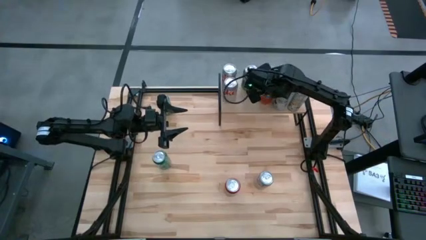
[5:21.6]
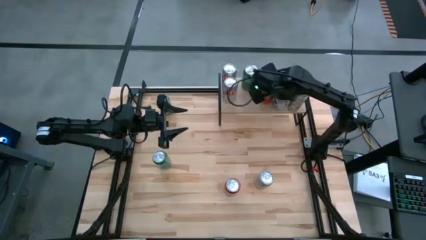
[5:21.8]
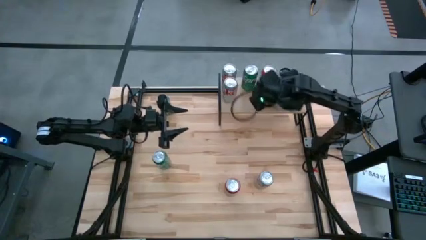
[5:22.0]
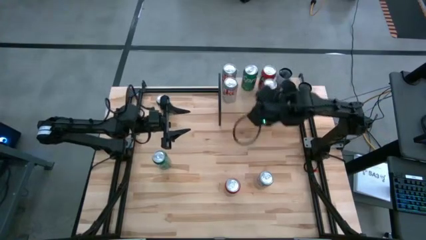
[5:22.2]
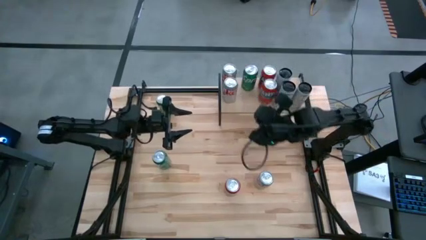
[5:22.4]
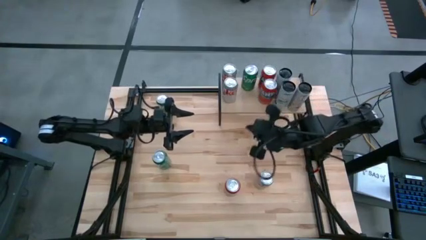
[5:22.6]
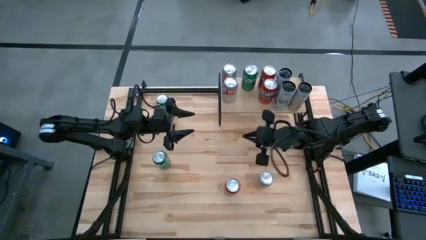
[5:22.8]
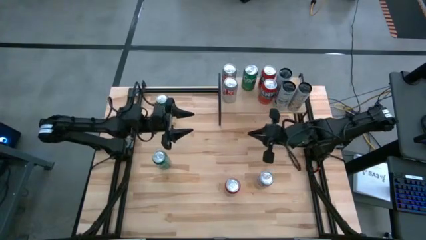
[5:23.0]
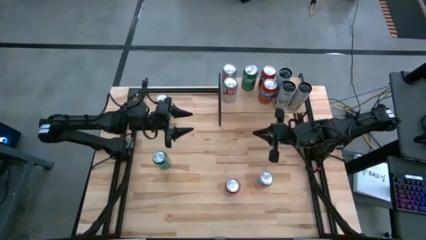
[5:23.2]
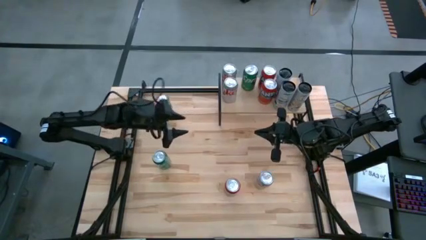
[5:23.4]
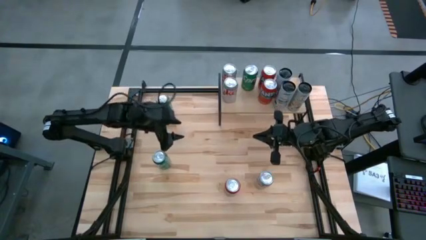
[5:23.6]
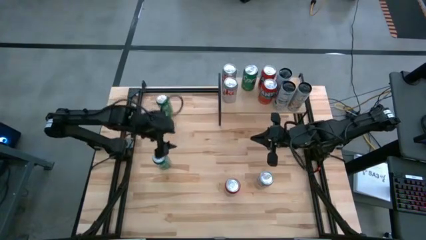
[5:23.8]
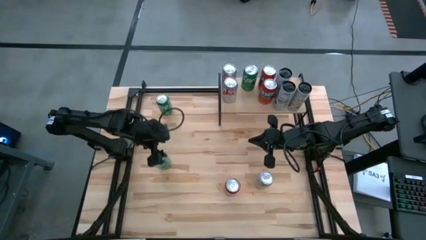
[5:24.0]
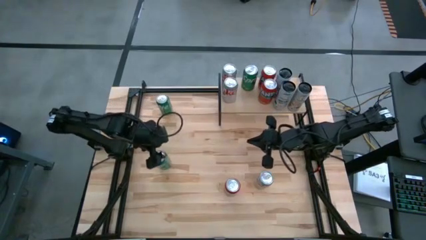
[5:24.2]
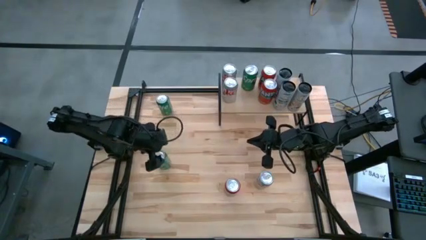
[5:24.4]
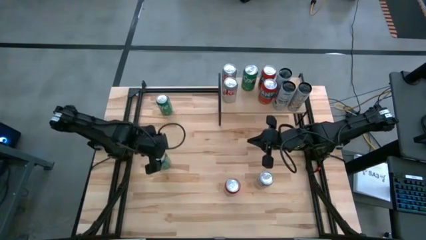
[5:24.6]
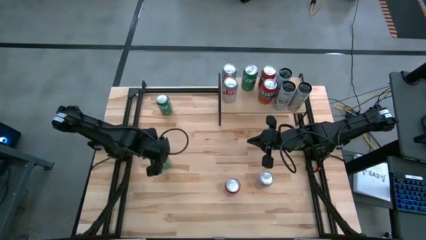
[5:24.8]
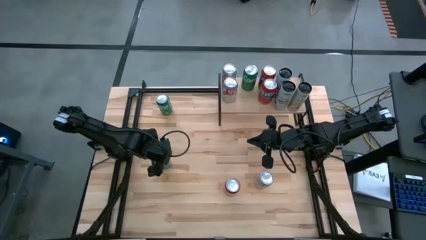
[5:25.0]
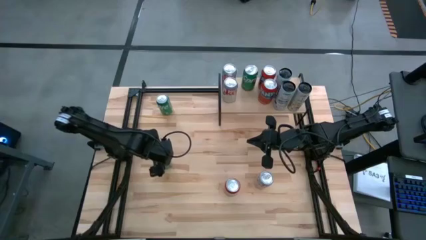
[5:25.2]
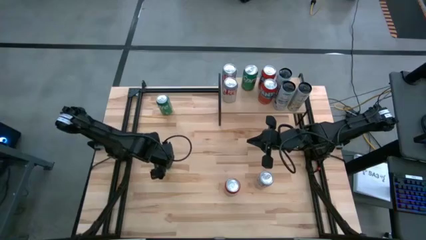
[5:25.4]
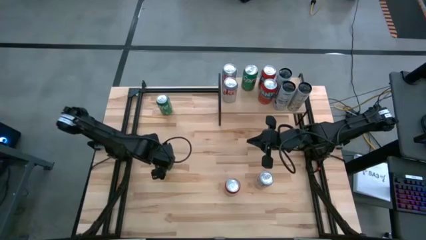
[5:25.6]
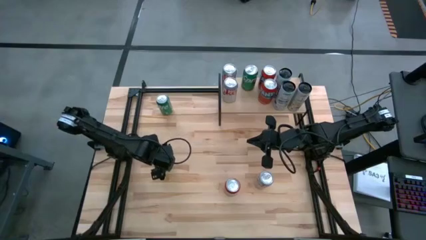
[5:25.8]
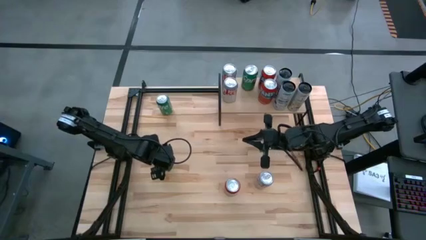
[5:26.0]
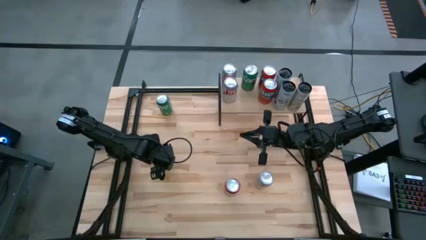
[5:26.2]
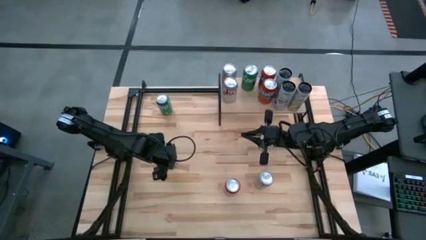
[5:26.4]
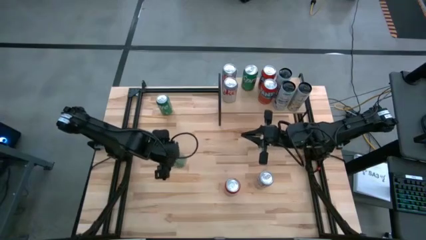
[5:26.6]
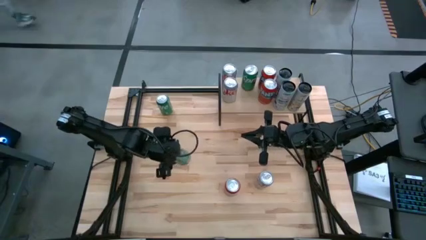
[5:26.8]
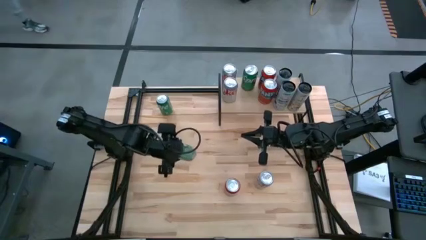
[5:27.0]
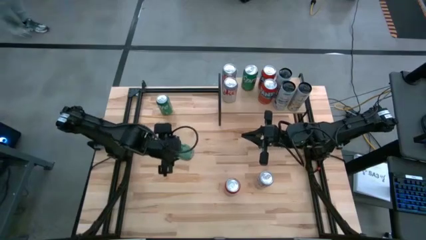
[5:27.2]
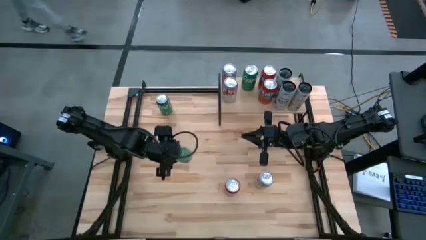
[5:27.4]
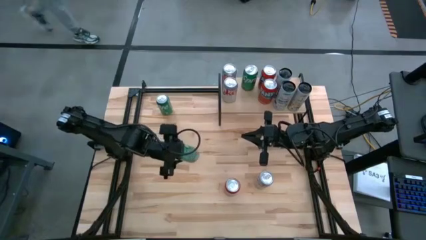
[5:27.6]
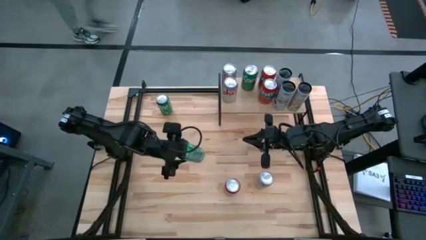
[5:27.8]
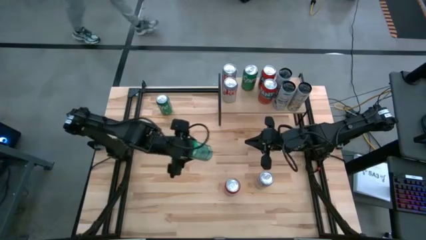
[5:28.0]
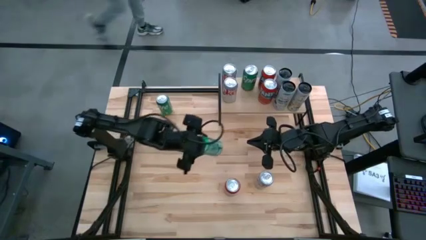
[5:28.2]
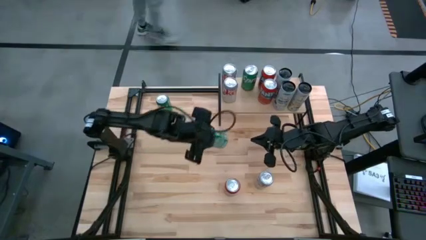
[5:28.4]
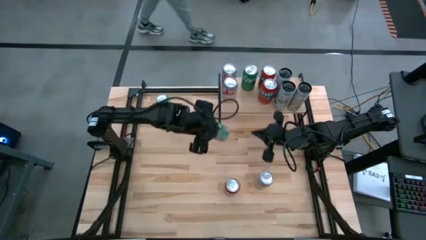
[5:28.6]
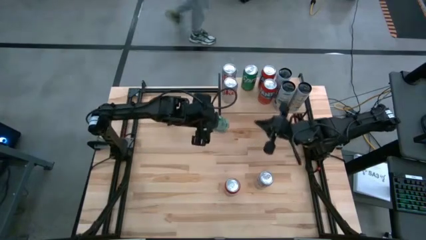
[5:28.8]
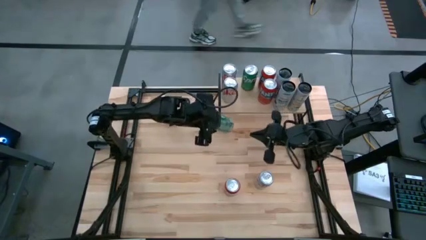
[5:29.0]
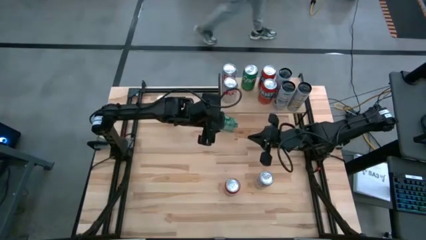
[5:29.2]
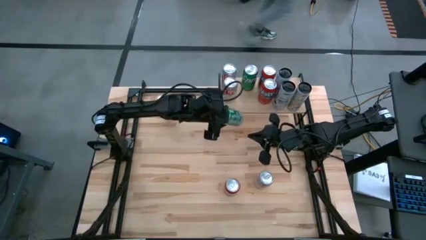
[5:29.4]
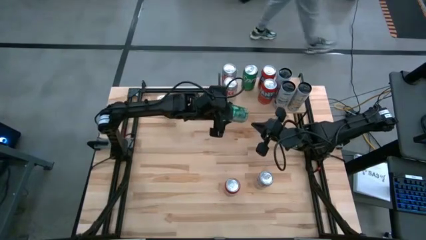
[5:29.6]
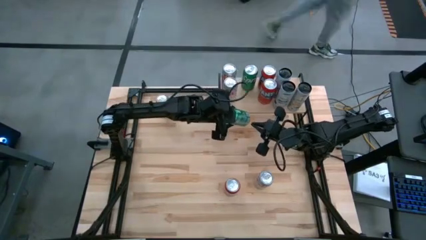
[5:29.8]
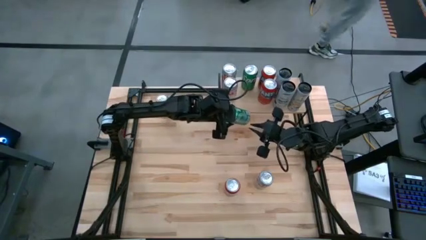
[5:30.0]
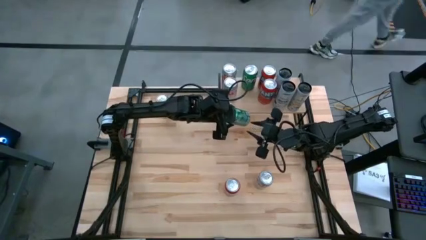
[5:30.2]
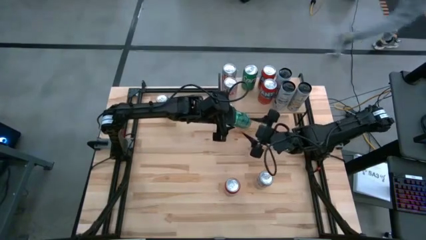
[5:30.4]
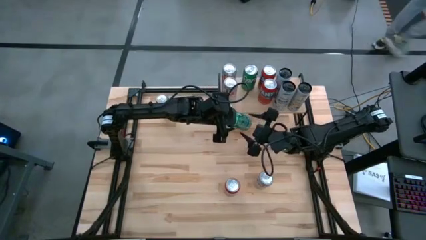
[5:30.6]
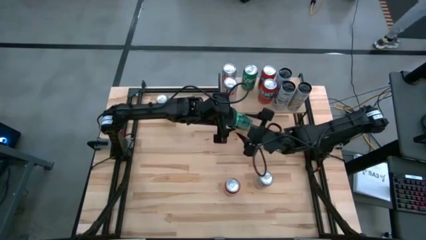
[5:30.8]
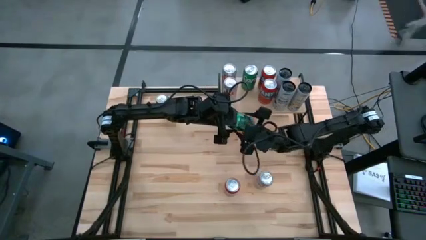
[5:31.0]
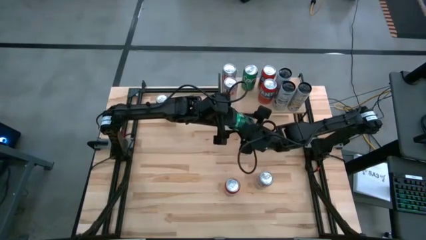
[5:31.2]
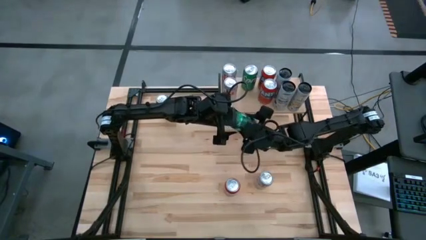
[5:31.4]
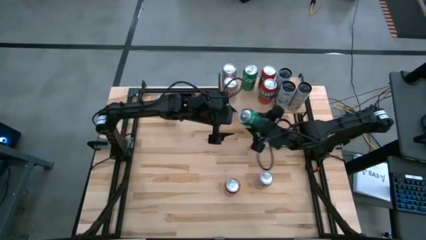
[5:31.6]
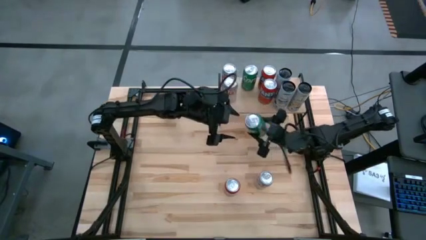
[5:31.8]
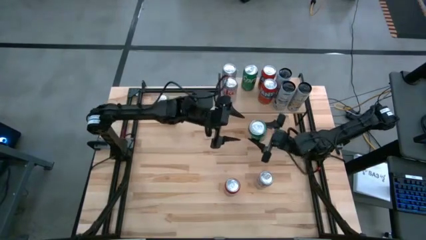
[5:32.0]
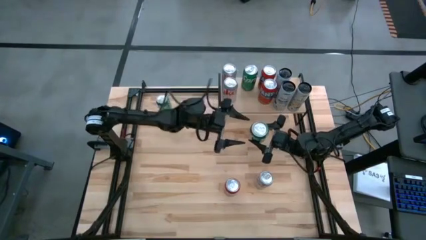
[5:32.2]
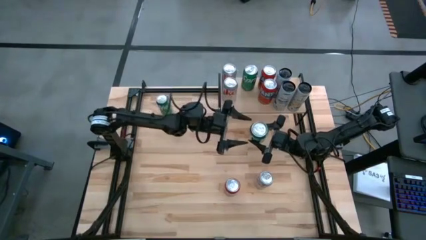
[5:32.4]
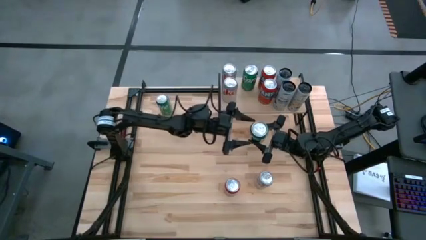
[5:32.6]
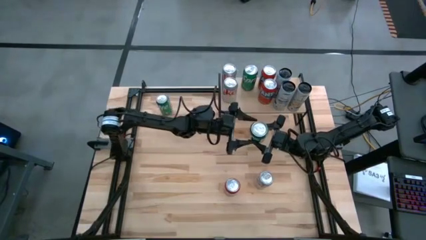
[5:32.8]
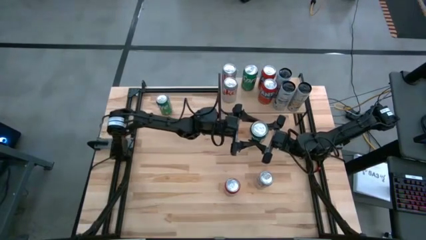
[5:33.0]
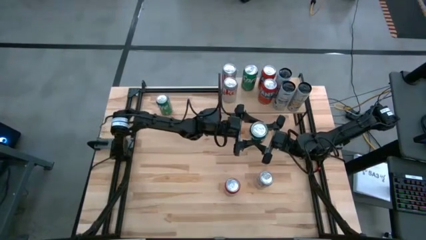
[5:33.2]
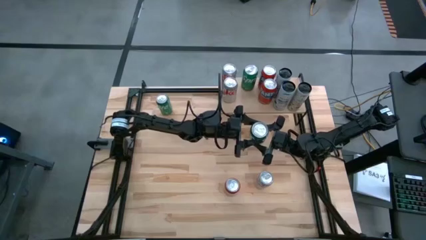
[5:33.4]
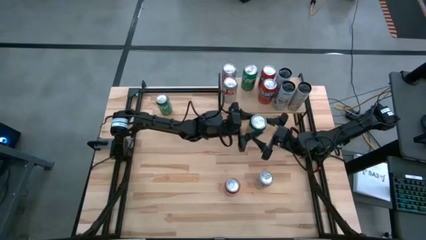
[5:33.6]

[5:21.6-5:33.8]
Task: Place canned beverage on shelf
Put the bottom green soda can on the shelf aligned in front of the other green soda can
